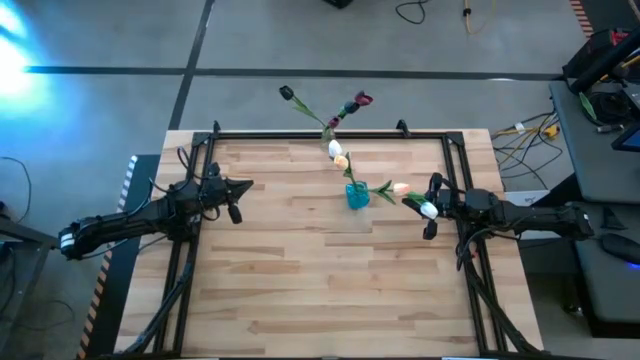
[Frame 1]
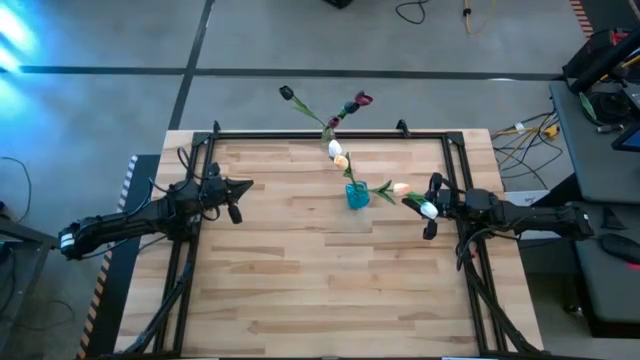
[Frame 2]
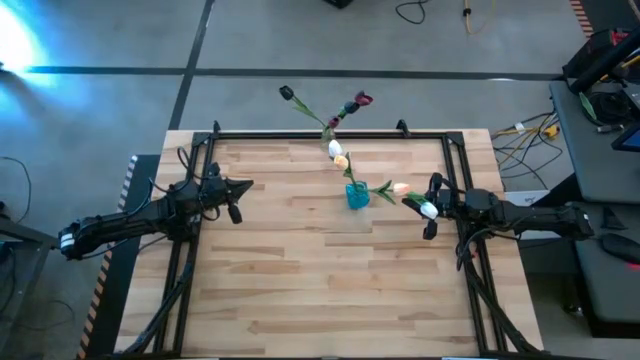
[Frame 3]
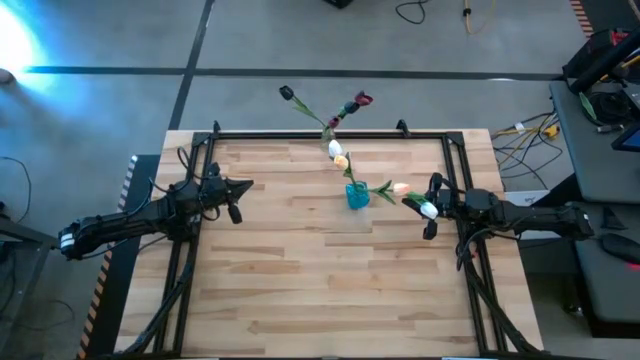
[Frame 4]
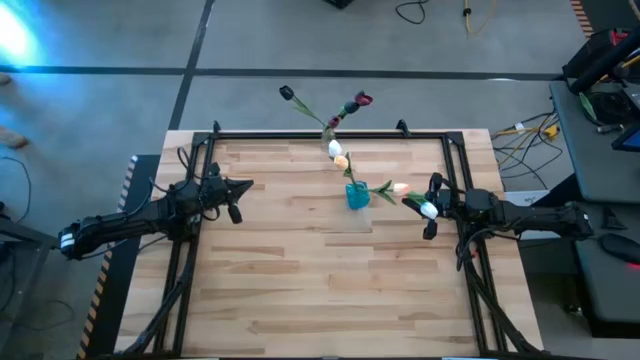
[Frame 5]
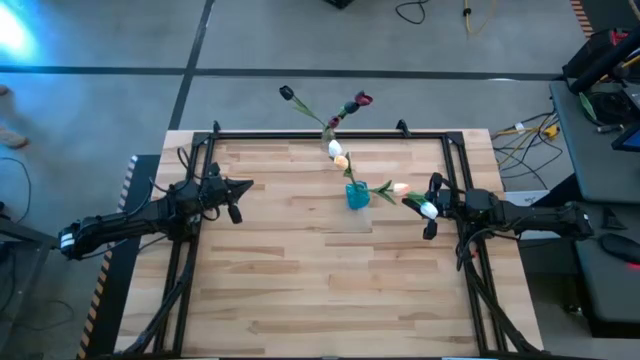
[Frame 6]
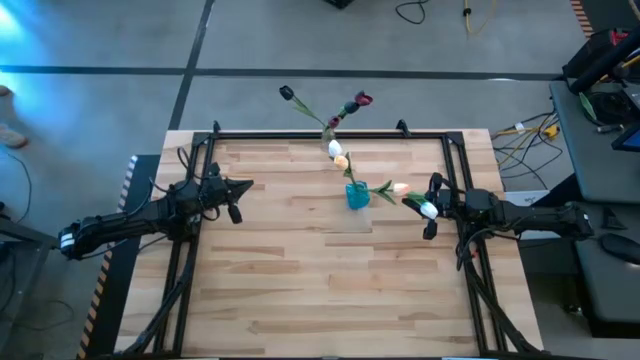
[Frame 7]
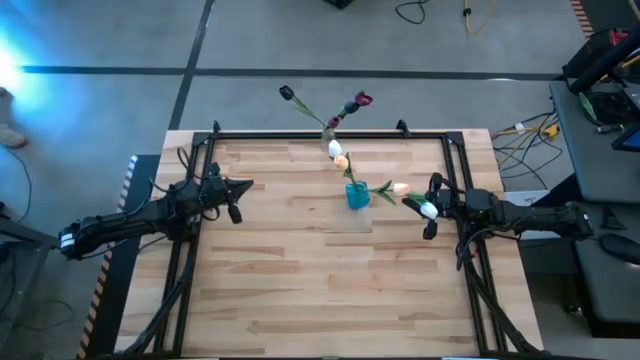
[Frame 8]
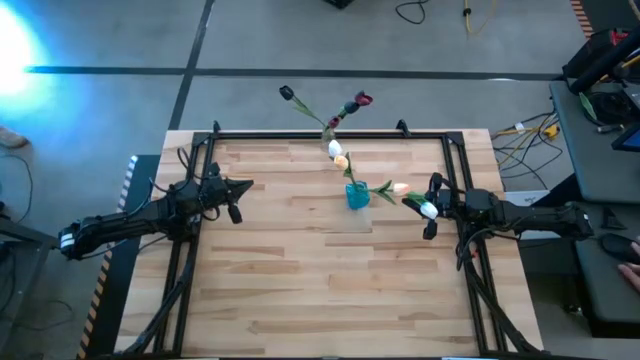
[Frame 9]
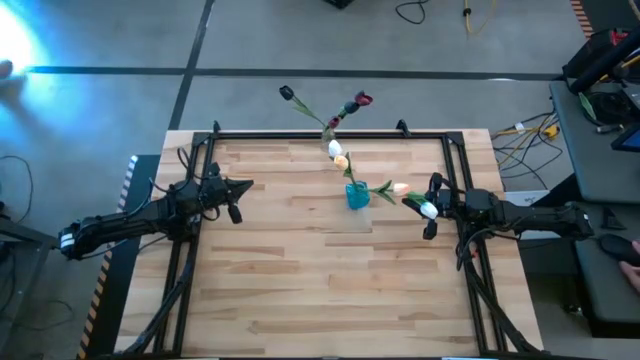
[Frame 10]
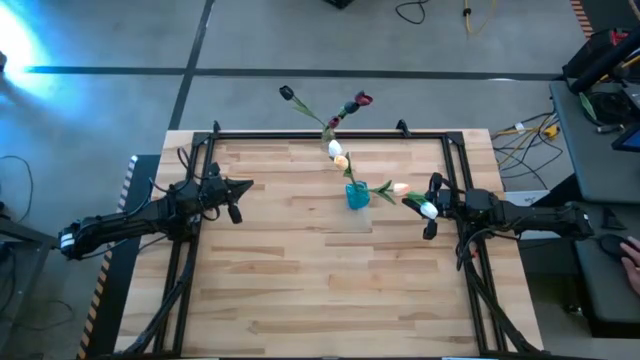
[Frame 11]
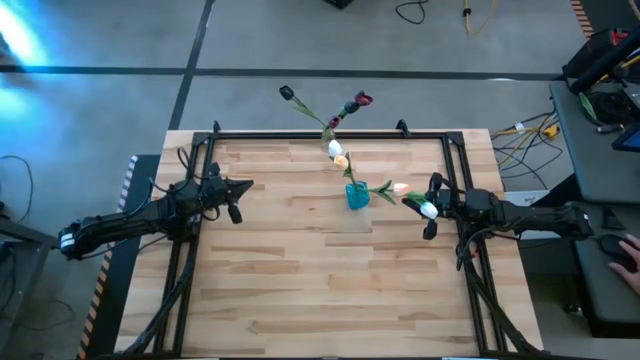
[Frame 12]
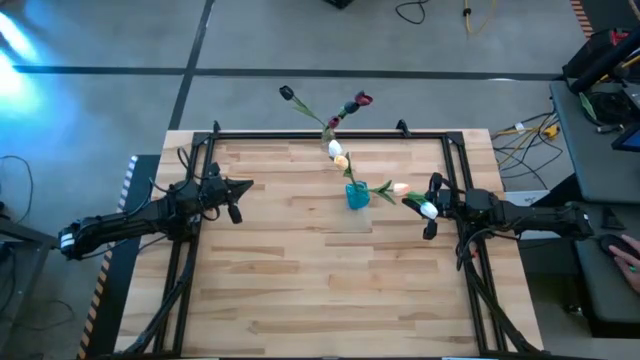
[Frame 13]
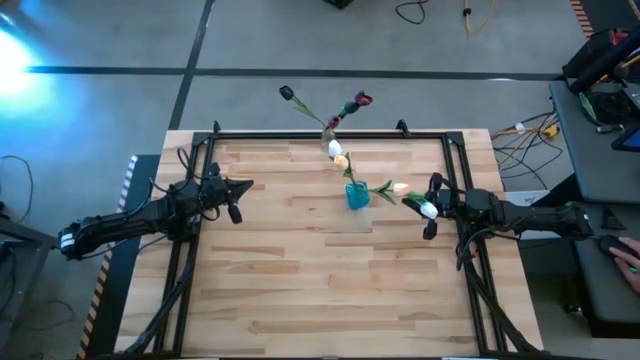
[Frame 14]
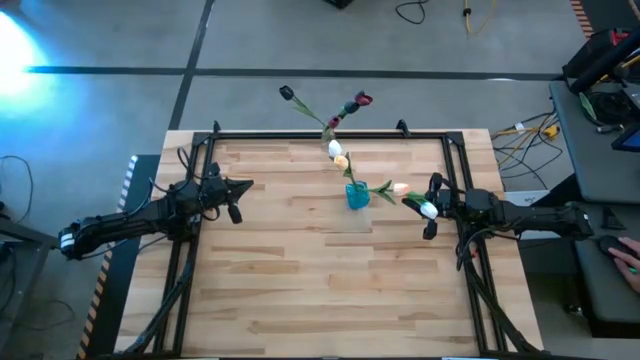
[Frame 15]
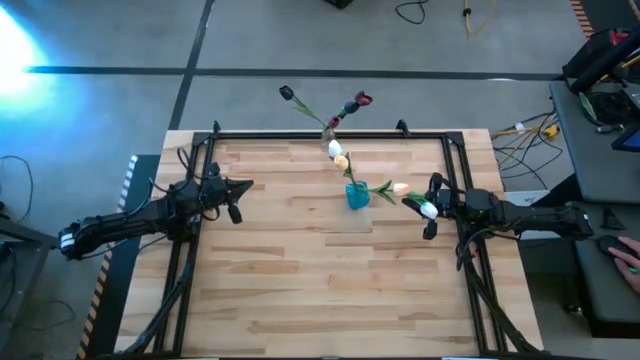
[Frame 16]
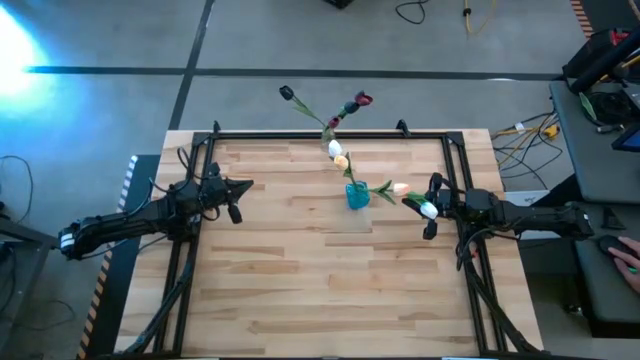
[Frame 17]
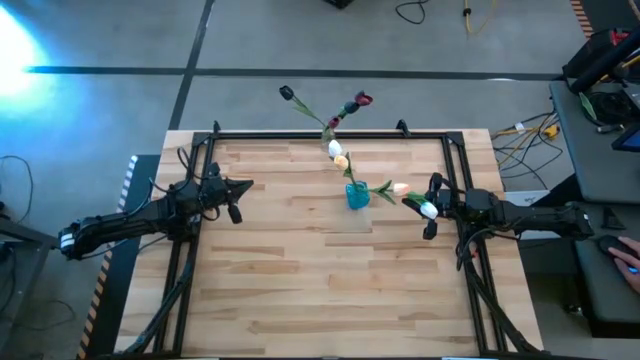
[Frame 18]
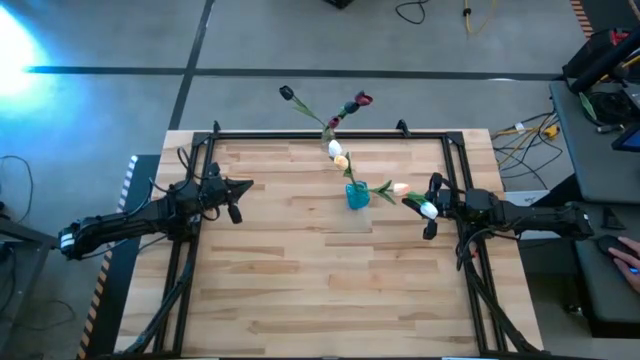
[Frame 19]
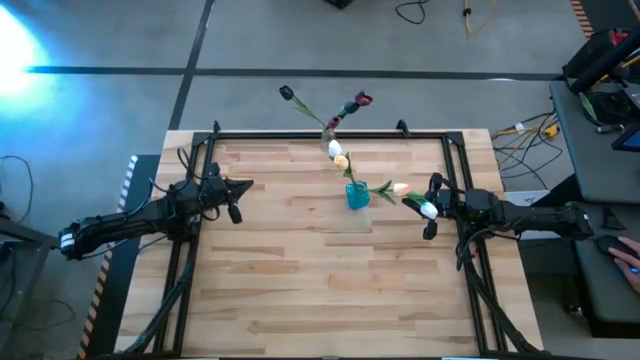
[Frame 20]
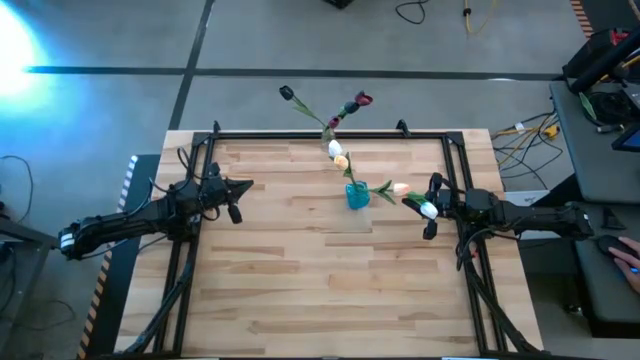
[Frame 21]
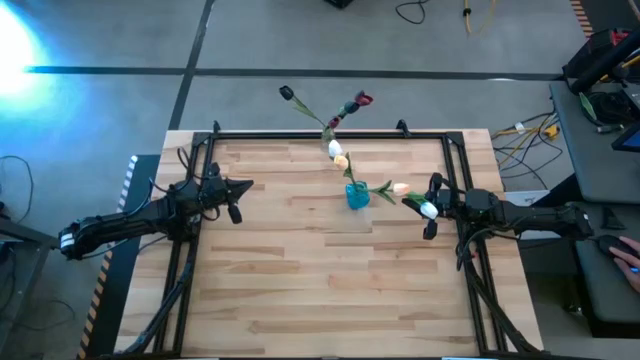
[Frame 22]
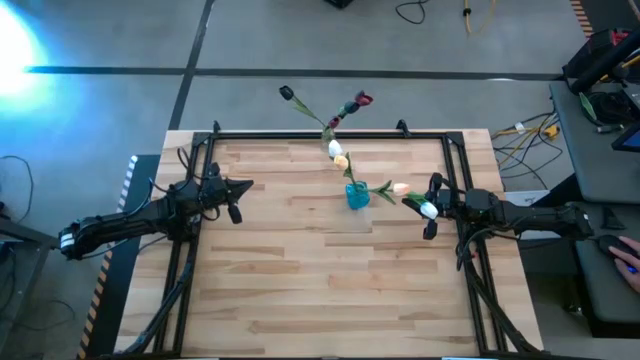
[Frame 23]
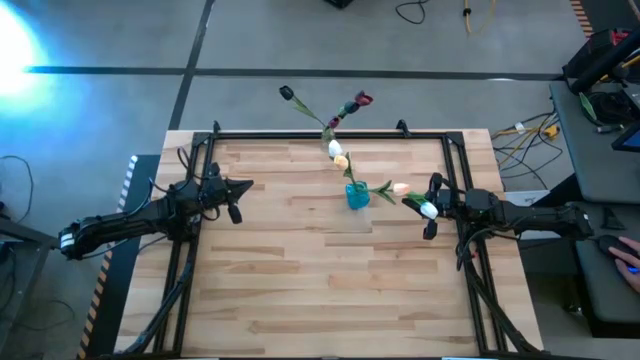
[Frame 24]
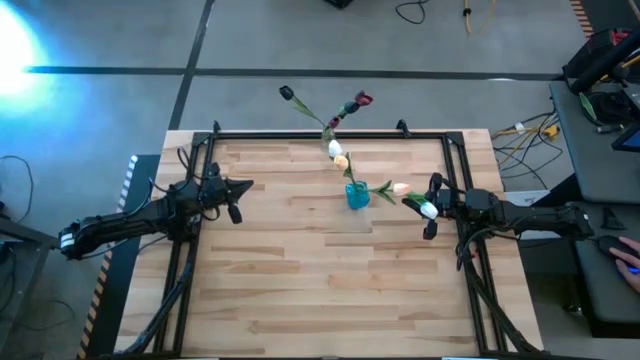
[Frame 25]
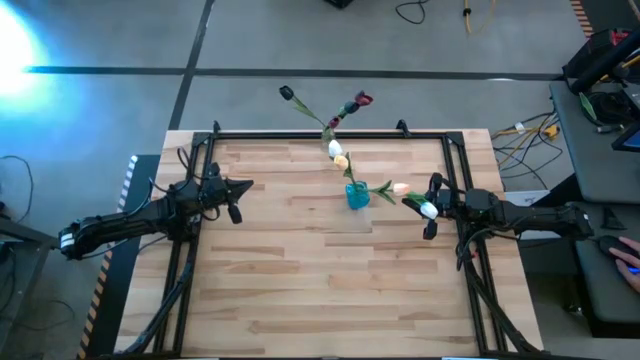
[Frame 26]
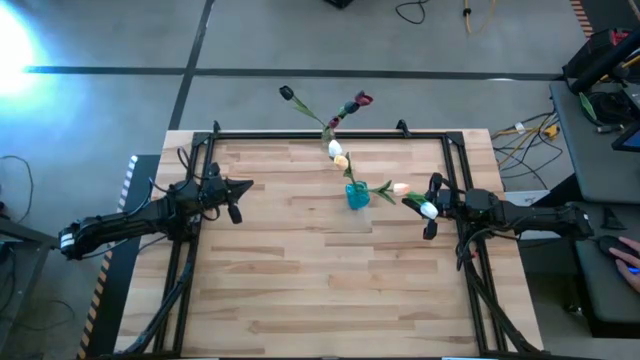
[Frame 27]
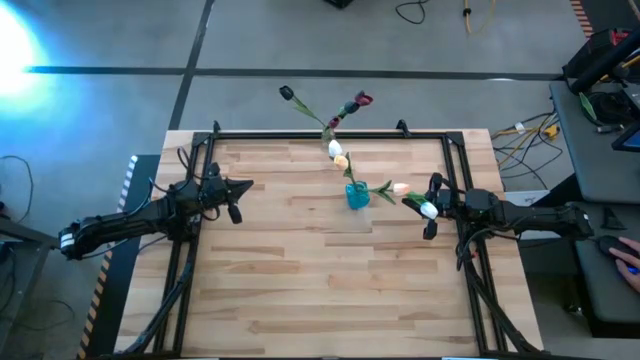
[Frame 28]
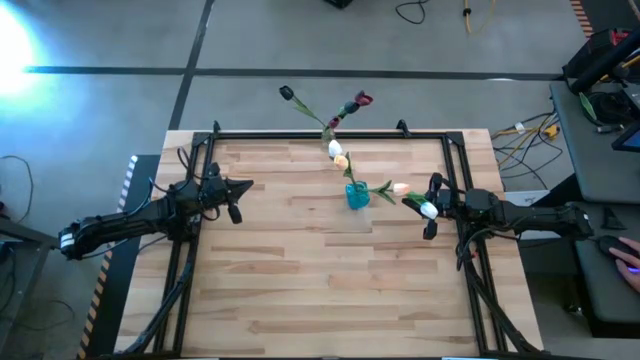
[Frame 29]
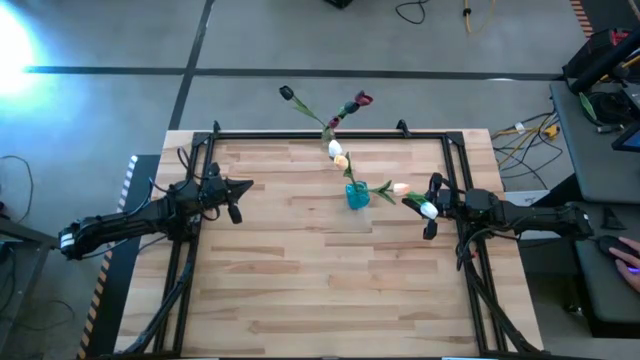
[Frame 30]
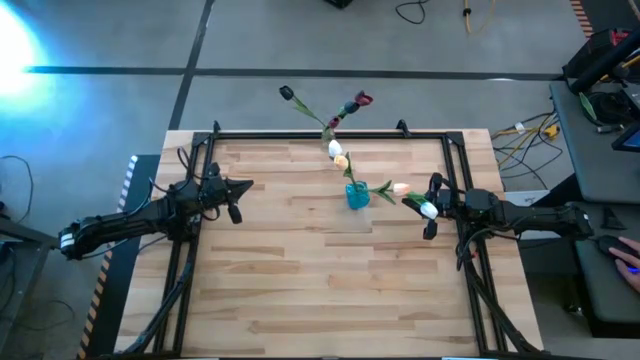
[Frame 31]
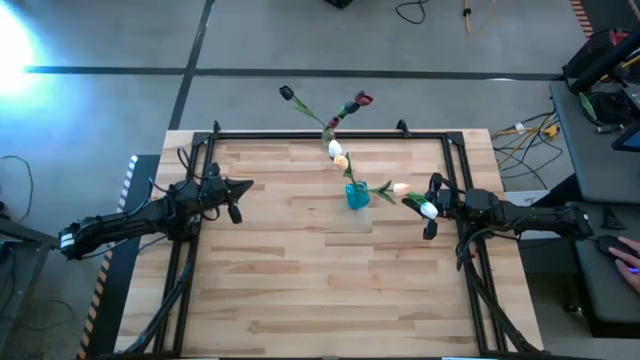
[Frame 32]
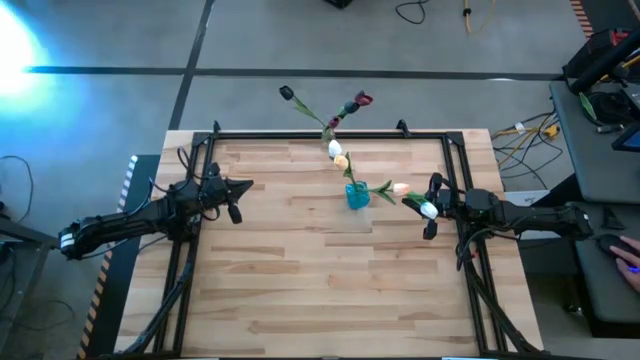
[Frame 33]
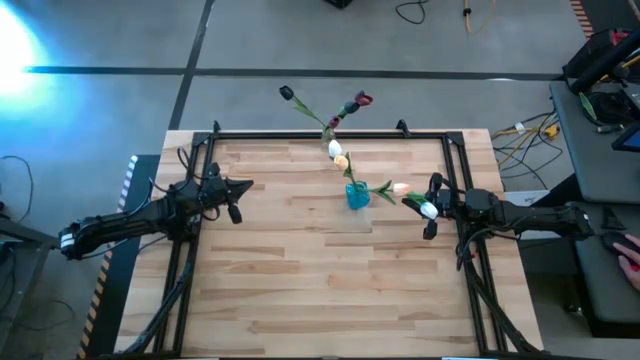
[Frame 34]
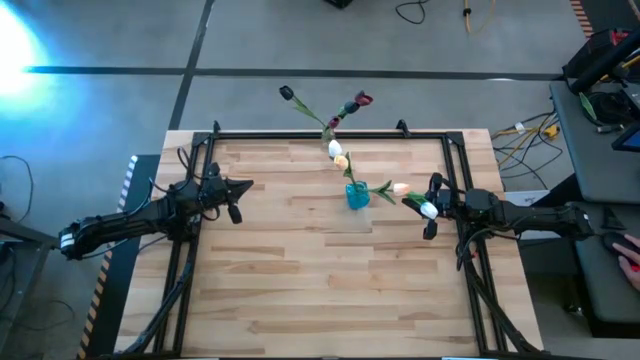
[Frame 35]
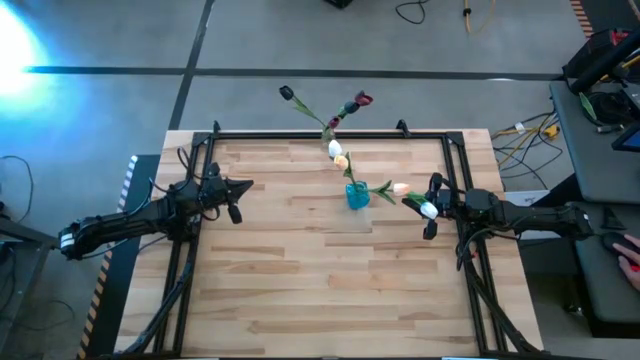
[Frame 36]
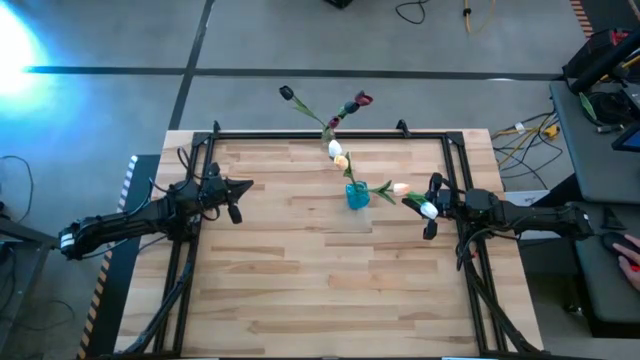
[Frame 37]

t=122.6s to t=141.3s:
Task: Sort flowers into vase by color
Return to Home Position

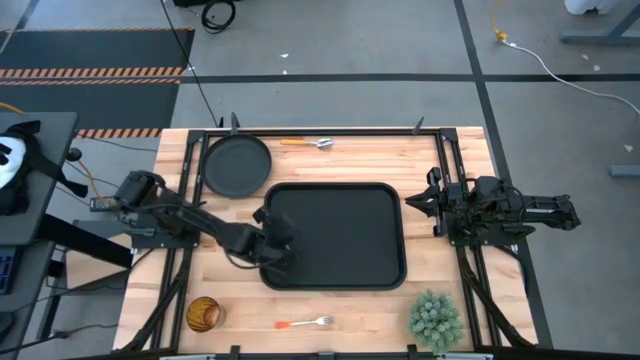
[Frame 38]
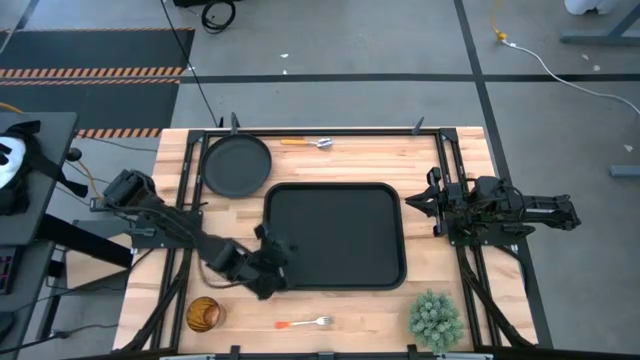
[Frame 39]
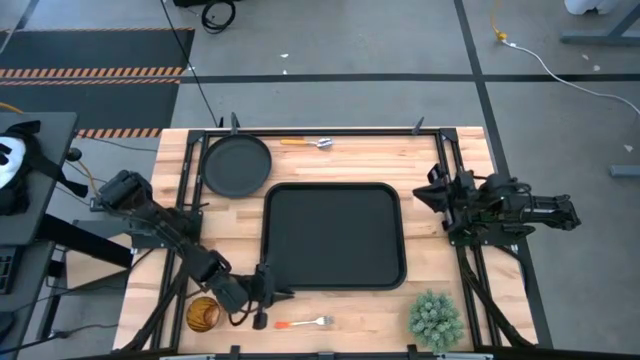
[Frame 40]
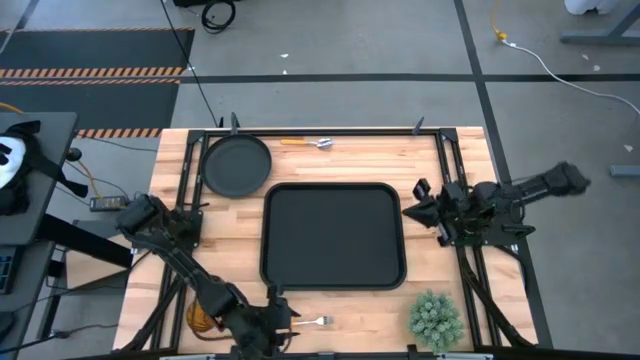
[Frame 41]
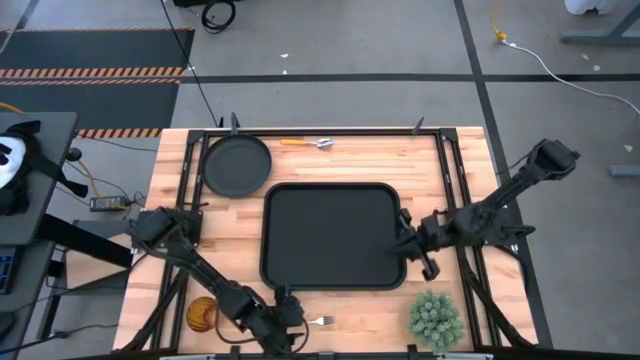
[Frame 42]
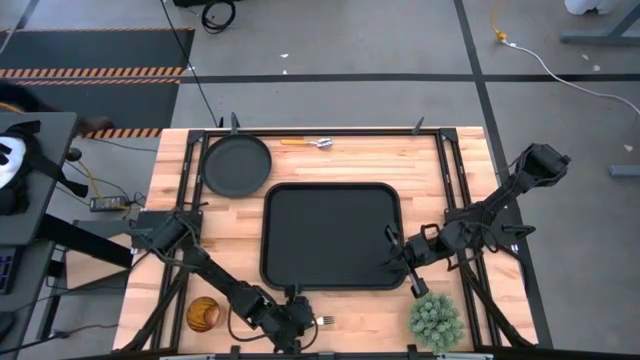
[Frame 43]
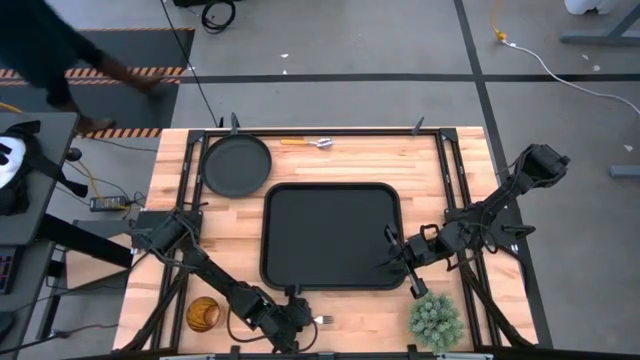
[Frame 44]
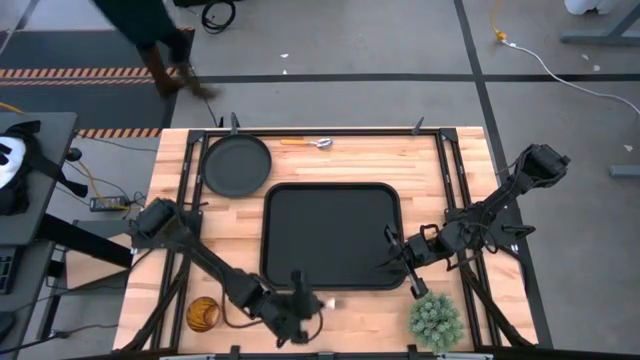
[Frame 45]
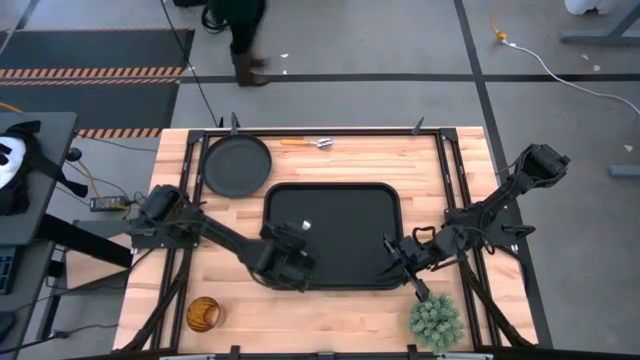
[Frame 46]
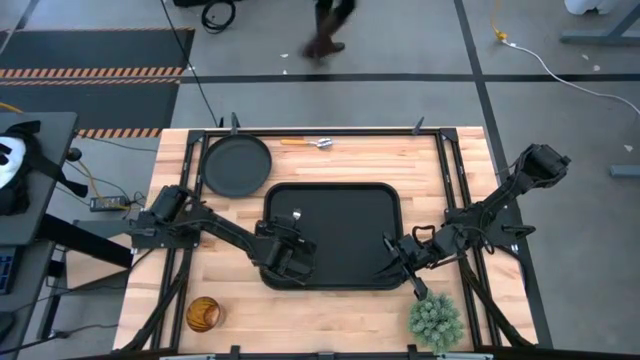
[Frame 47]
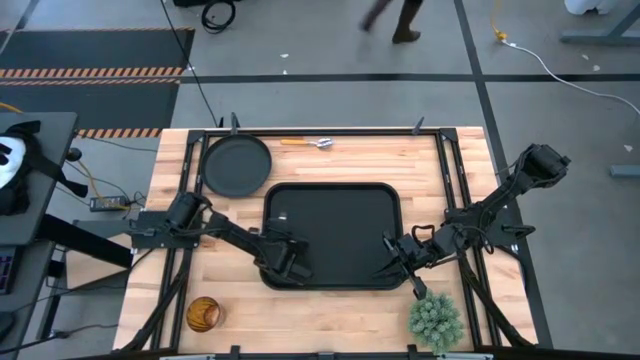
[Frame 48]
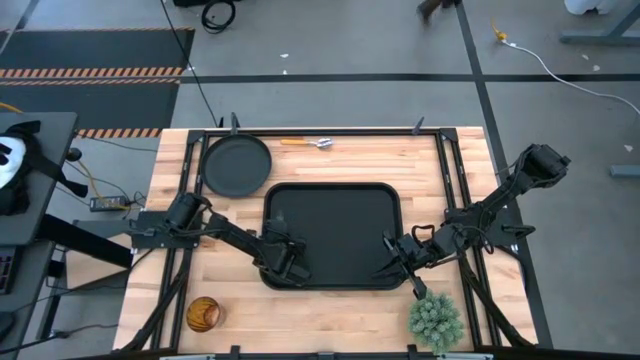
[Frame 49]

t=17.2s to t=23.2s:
Task: Pick and place plate/cup/fork/spoon on tray
Put the orange fork on the black tray
